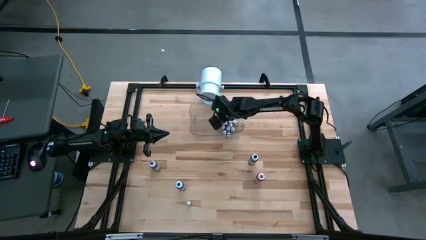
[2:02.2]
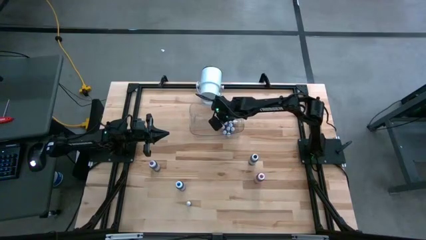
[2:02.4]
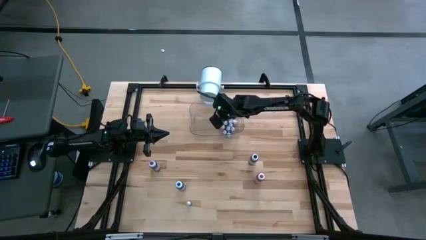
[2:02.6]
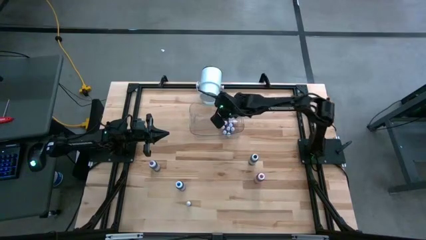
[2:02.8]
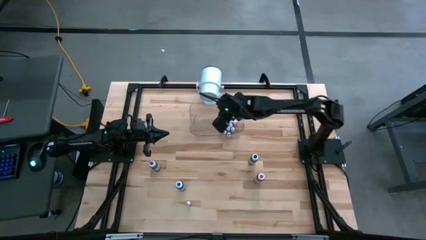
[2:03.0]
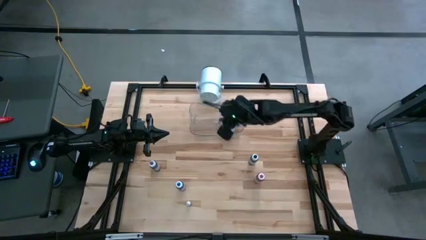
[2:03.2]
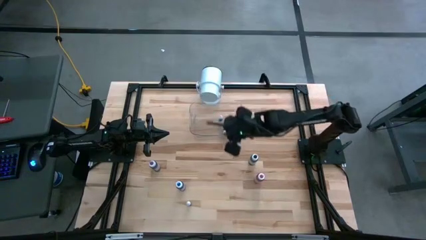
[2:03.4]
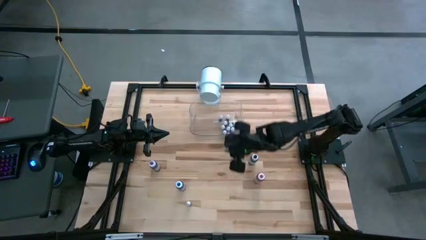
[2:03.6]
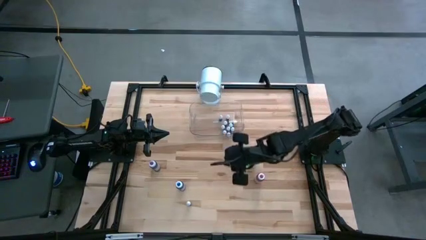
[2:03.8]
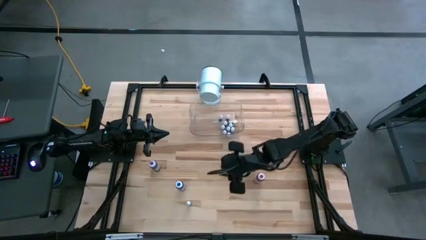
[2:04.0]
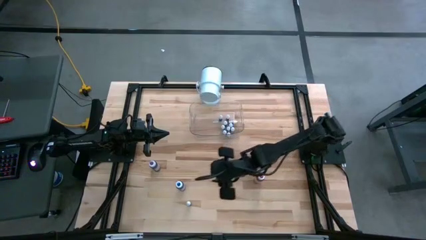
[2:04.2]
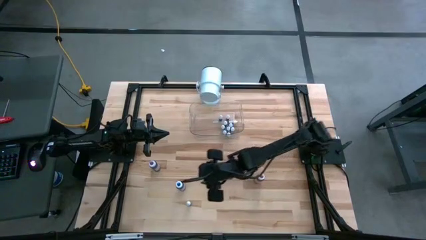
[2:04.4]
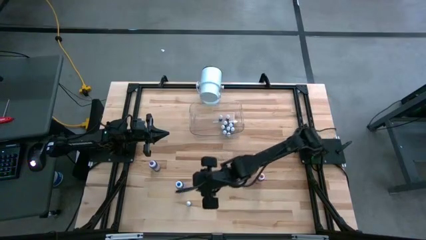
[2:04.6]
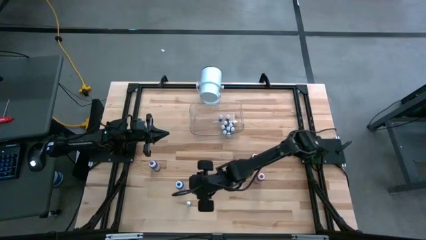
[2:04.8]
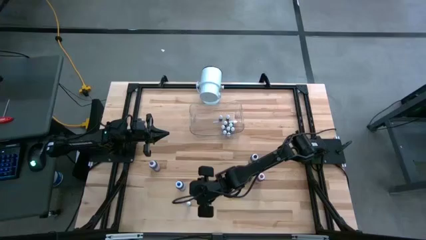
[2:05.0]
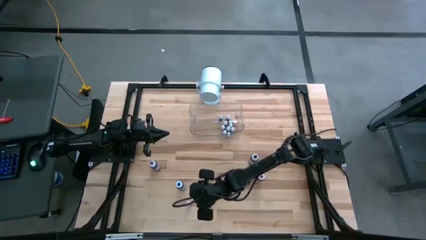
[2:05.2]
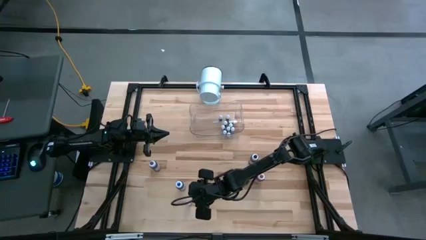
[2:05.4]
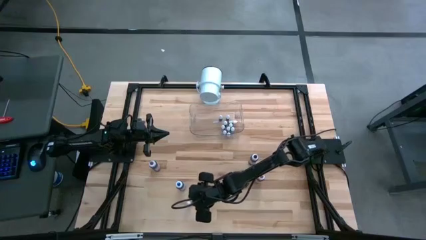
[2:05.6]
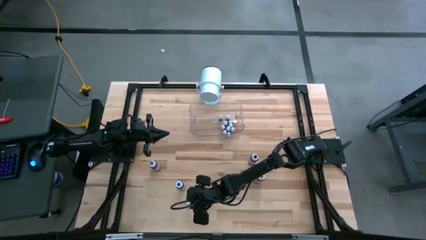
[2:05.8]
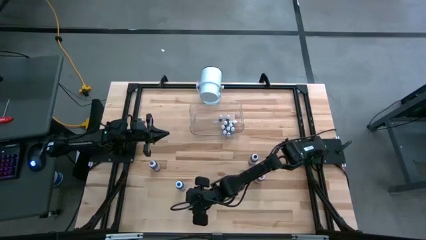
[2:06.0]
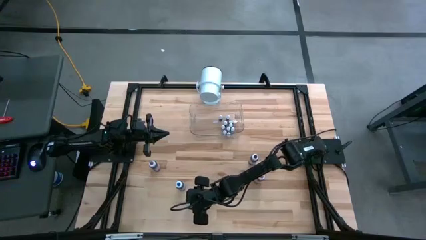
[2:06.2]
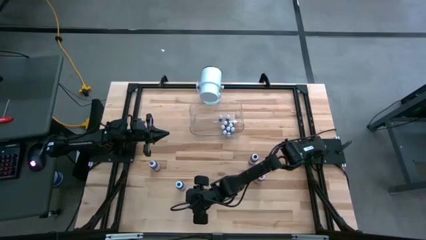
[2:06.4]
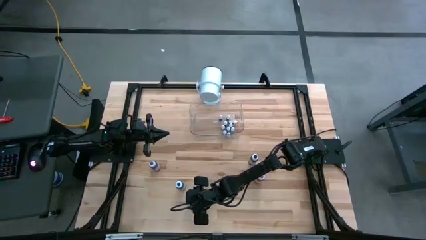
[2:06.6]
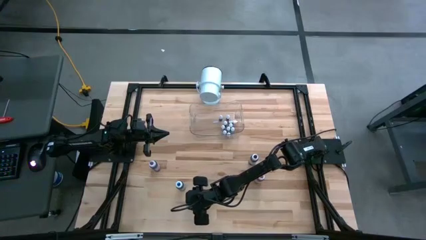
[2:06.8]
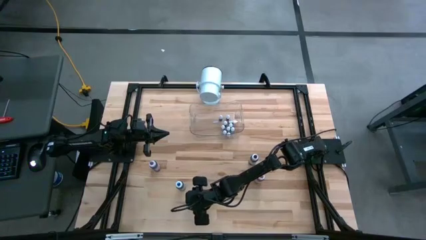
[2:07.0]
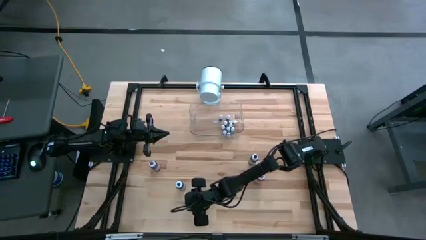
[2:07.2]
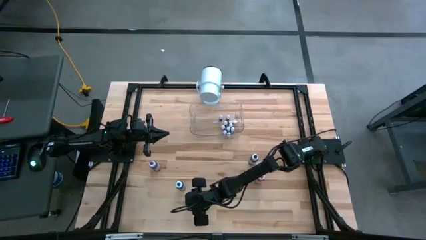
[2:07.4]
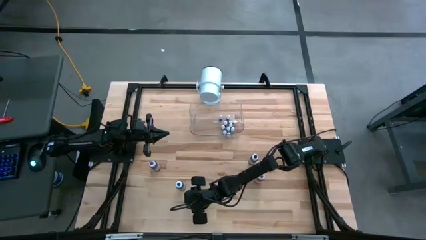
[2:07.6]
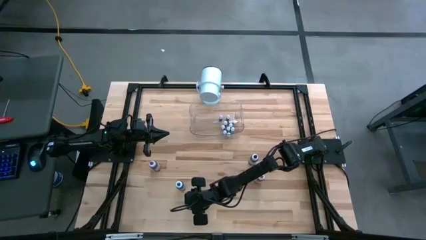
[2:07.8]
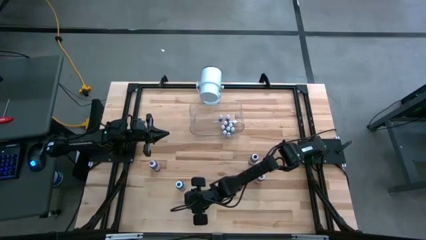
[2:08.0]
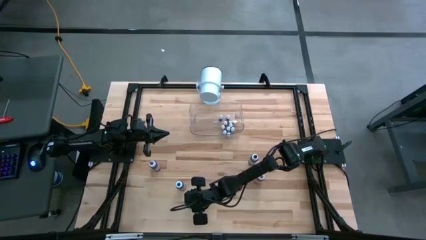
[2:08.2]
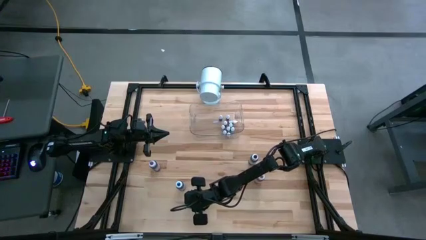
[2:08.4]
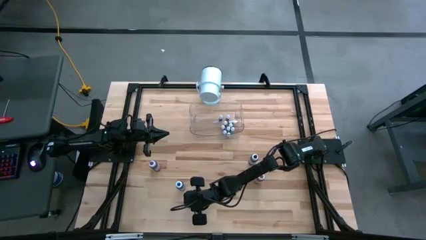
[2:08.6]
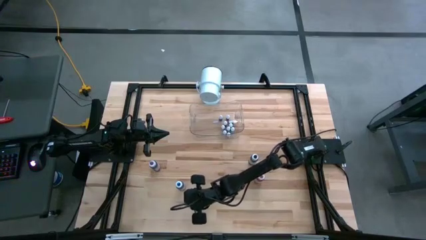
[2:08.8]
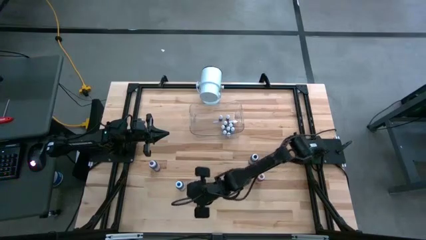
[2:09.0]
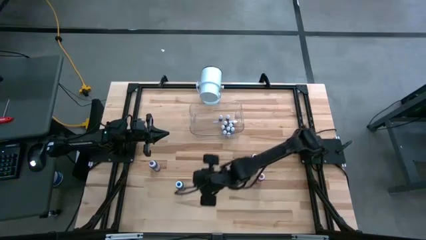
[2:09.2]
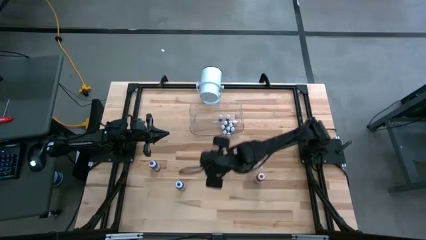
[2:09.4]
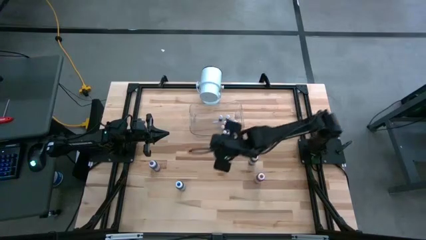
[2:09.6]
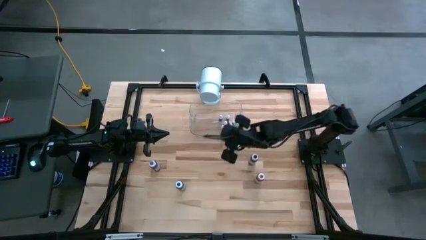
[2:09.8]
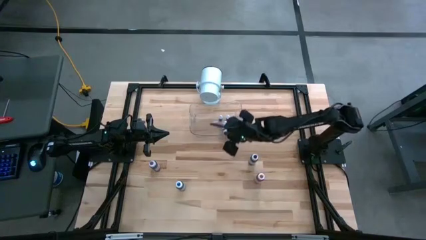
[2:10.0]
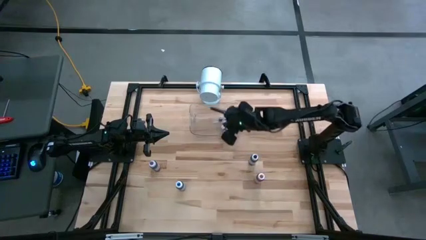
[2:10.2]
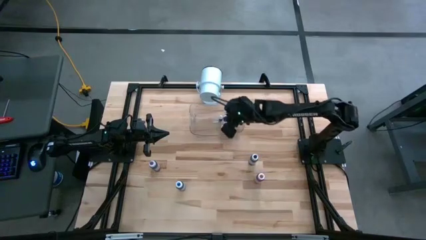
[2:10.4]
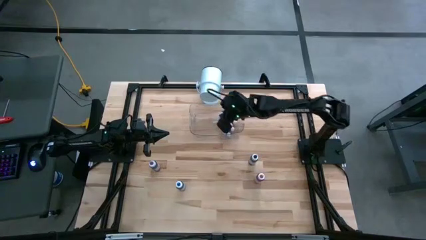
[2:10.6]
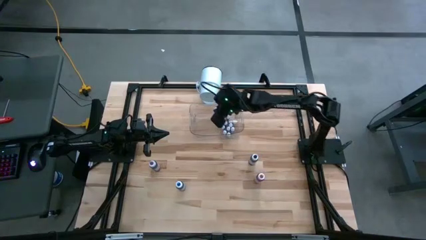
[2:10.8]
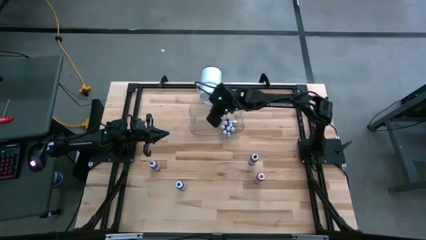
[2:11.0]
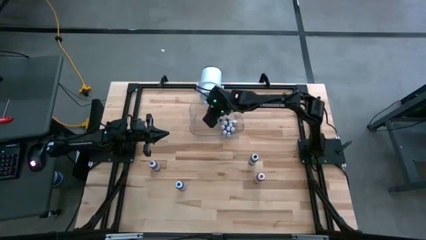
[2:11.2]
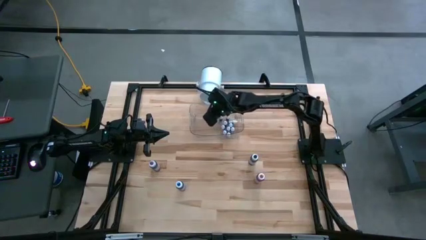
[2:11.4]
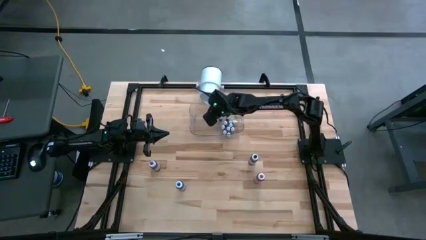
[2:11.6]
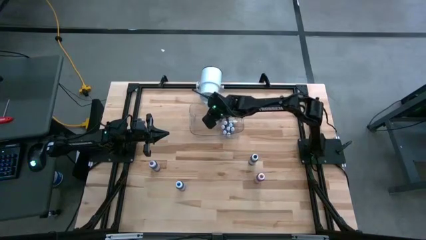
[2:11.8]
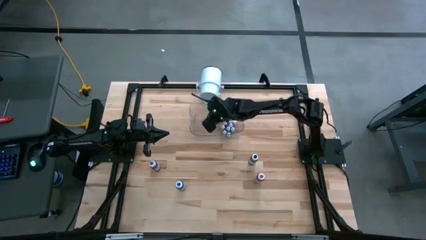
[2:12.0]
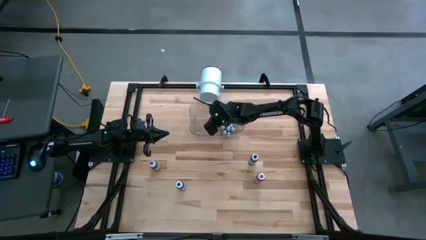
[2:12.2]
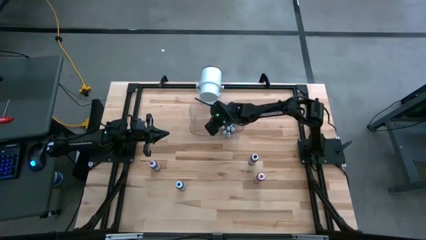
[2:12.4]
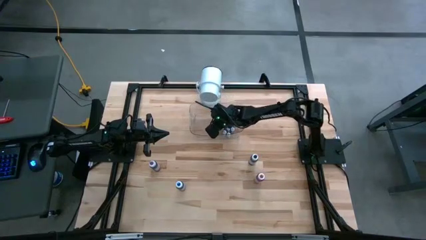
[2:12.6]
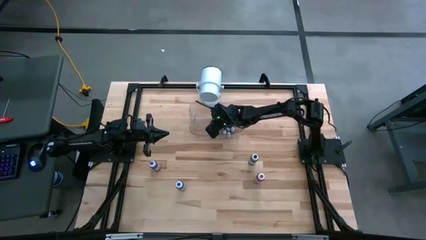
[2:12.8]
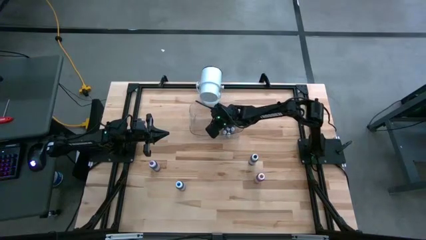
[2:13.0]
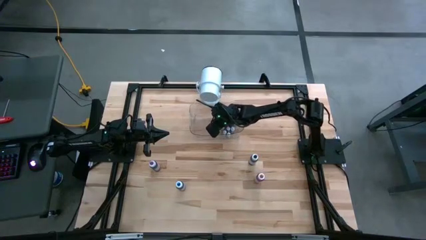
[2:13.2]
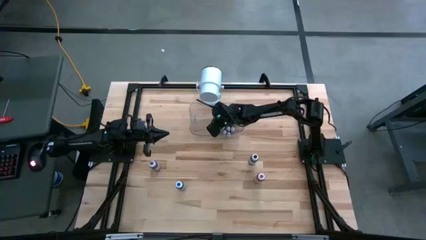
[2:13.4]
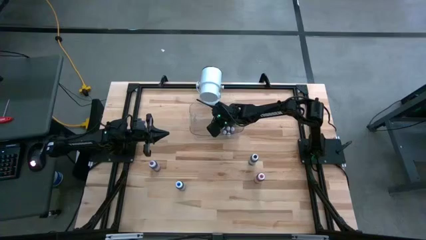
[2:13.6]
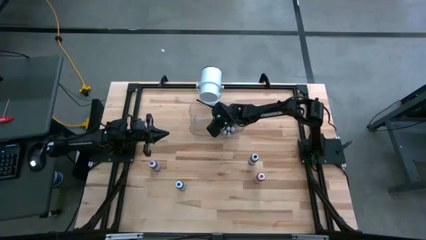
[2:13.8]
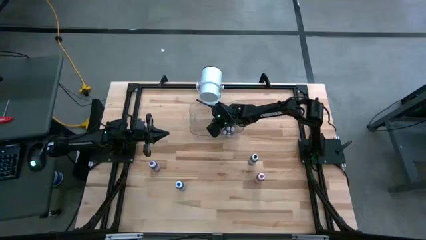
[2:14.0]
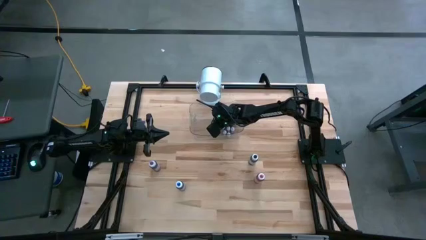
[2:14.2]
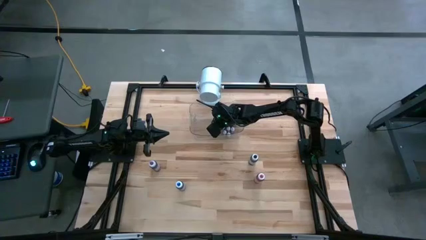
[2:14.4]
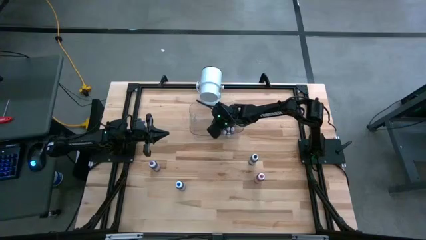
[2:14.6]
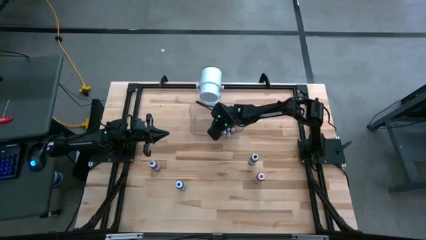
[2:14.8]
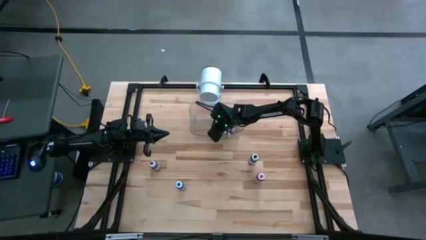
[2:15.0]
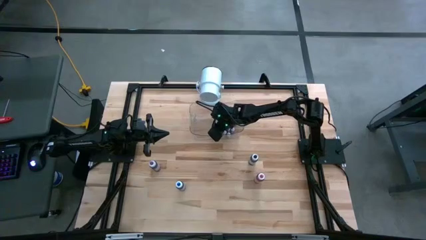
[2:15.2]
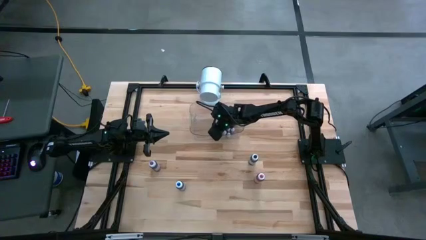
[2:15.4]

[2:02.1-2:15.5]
Task: Pick & Place food coloring
Put the small green food coloring bottle into the transparent bin

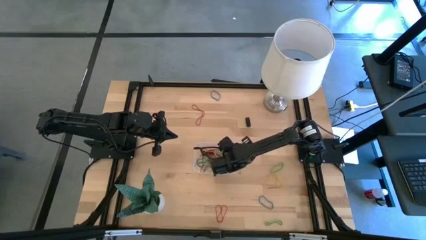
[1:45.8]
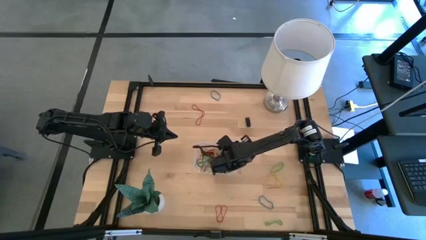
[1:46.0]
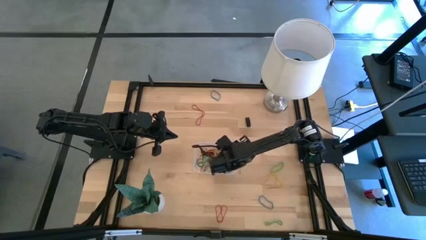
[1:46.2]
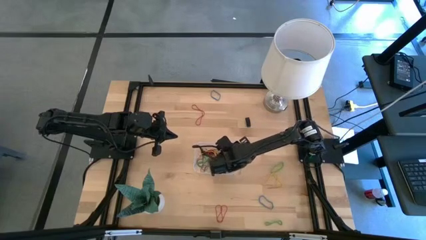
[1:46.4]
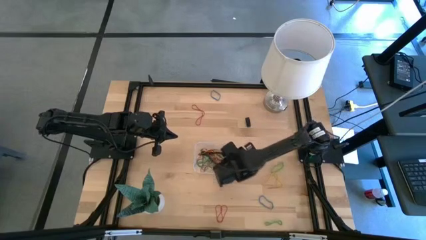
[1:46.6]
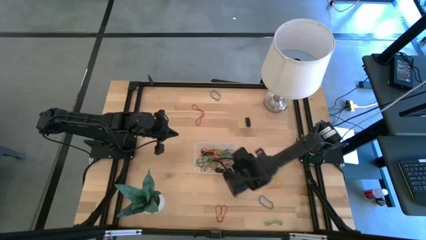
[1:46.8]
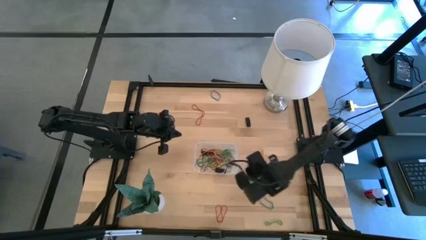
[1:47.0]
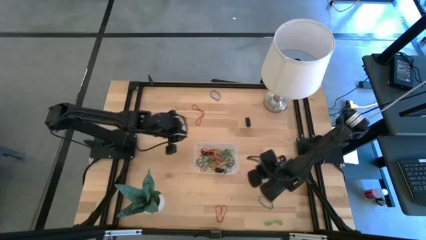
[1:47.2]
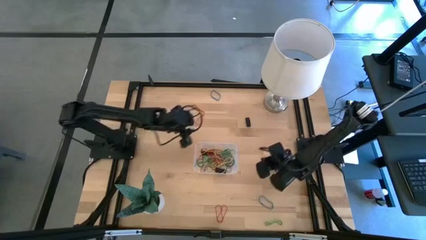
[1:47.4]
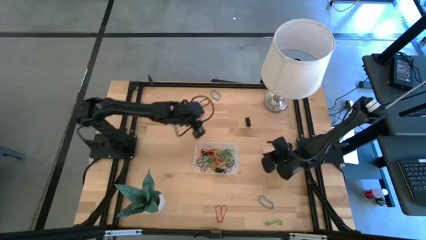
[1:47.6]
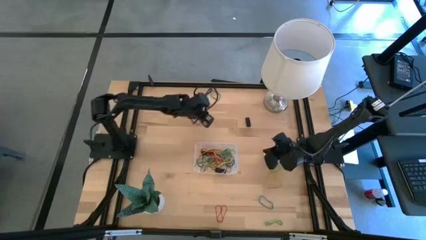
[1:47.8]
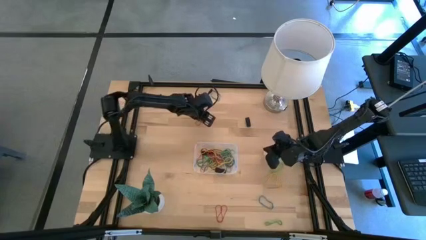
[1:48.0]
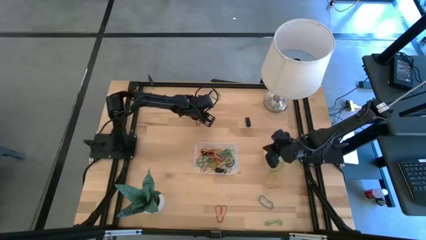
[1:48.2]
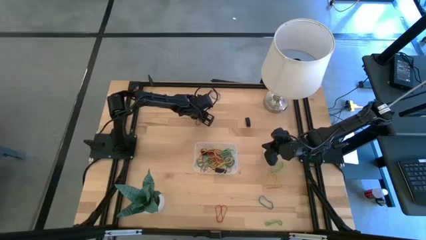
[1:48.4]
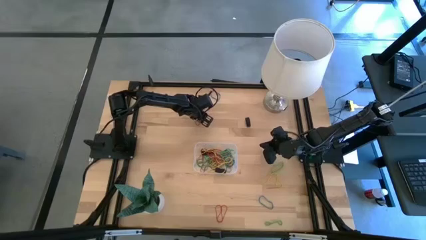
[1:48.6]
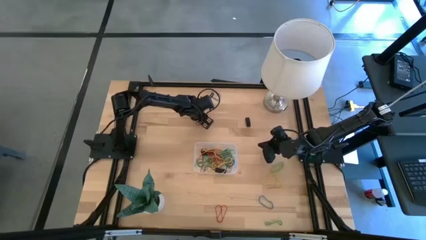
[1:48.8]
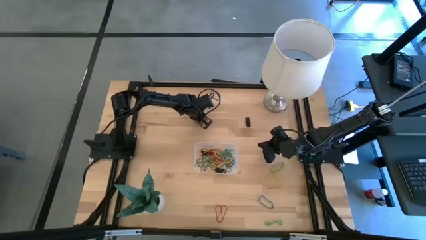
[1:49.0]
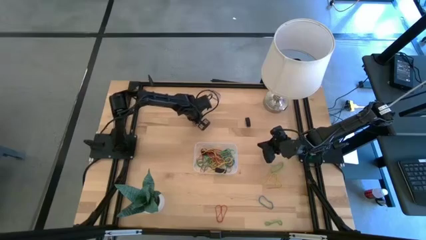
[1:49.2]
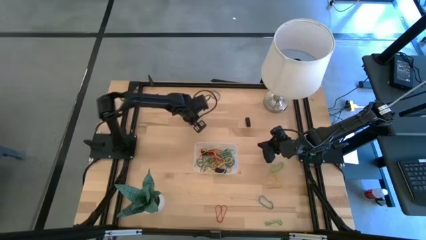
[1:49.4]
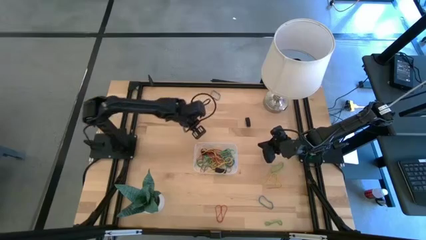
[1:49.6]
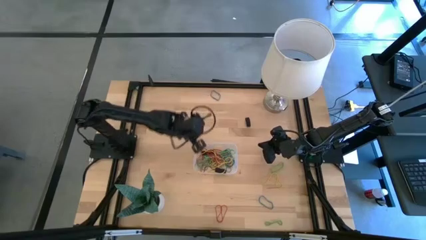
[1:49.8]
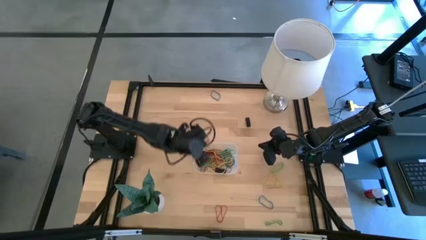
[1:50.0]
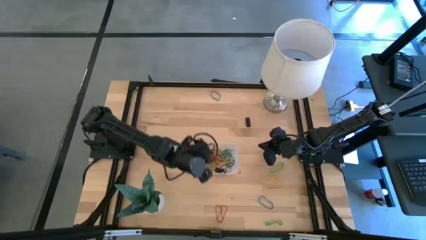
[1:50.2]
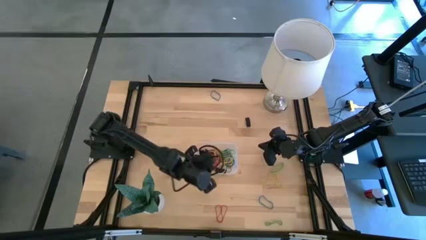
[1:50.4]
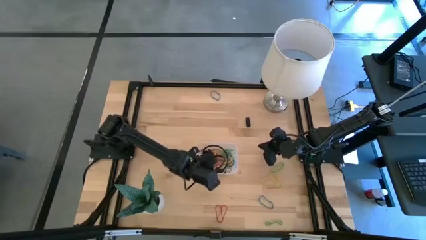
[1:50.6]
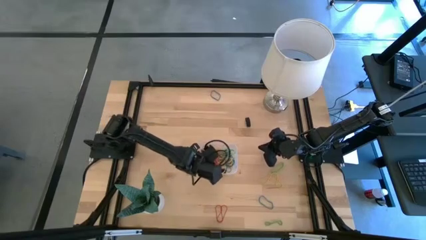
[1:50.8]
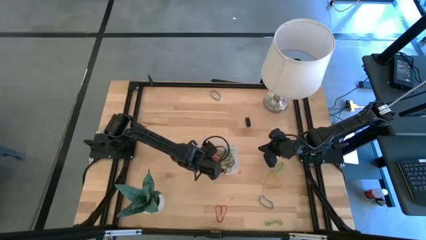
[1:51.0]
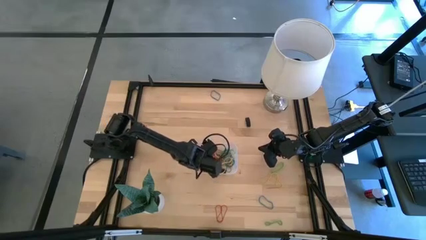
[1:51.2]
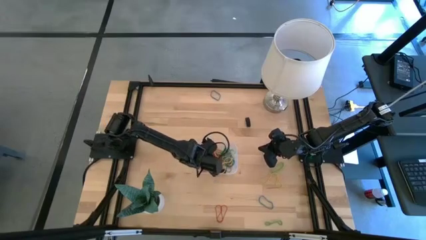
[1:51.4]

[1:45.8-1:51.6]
Task: Pick and place rubber bands into bin
Put the red rubber band into the transparent bin
